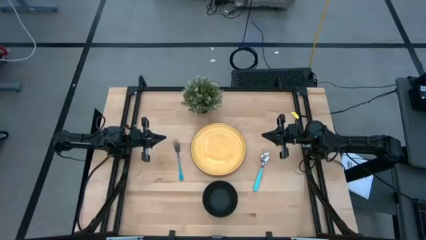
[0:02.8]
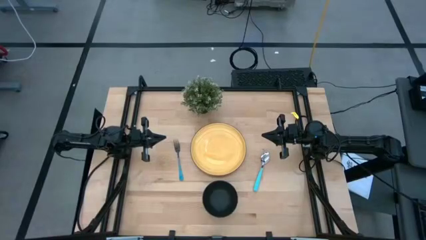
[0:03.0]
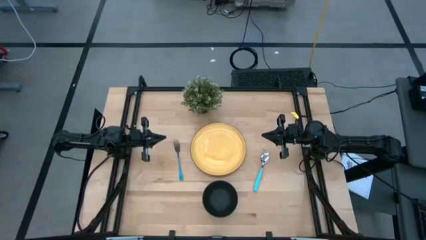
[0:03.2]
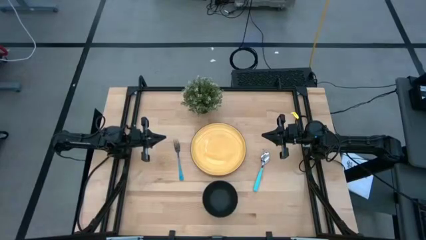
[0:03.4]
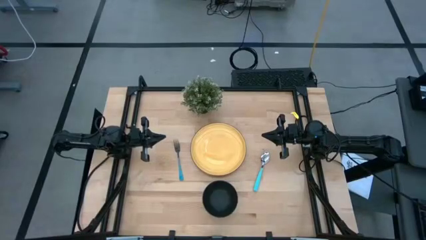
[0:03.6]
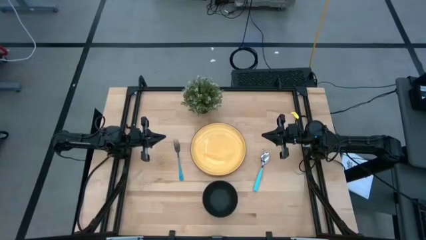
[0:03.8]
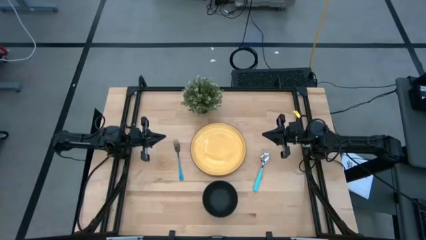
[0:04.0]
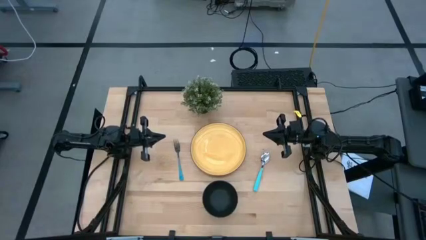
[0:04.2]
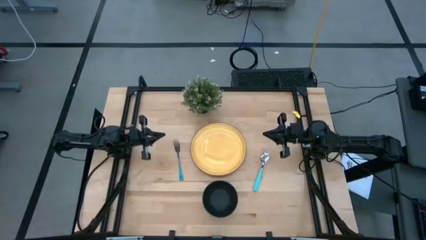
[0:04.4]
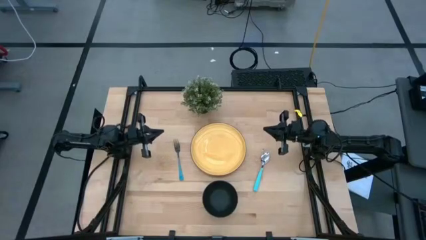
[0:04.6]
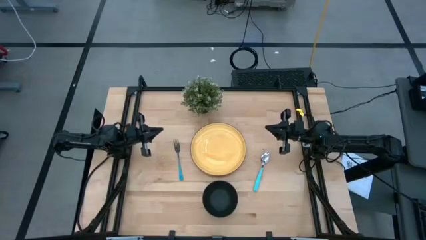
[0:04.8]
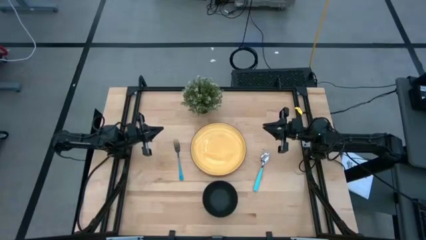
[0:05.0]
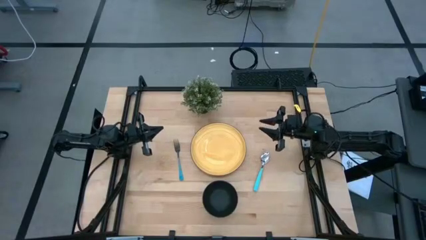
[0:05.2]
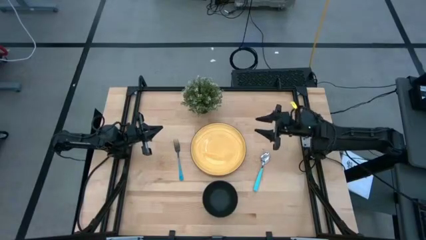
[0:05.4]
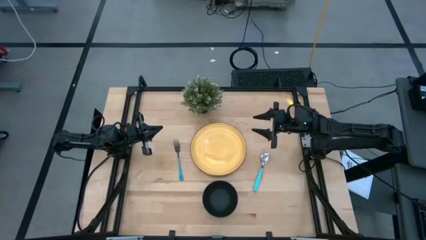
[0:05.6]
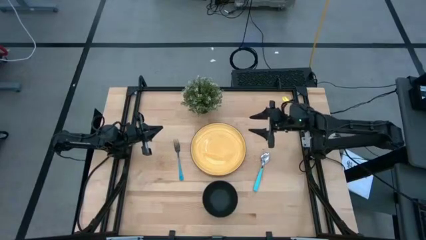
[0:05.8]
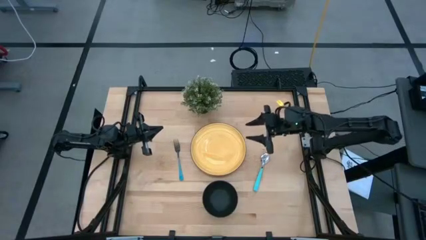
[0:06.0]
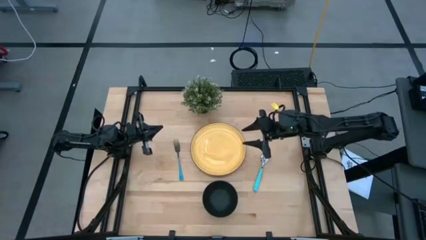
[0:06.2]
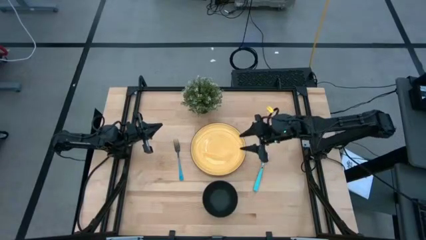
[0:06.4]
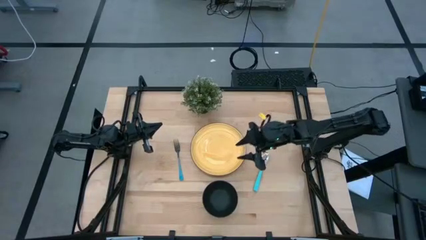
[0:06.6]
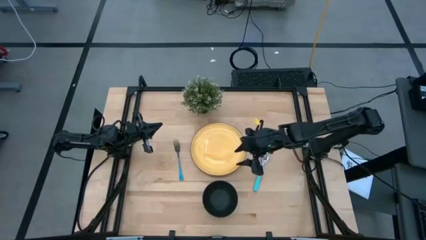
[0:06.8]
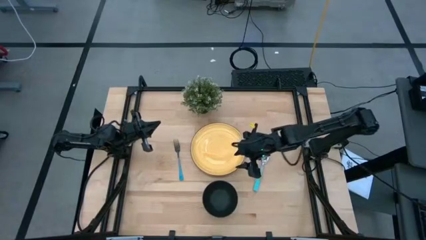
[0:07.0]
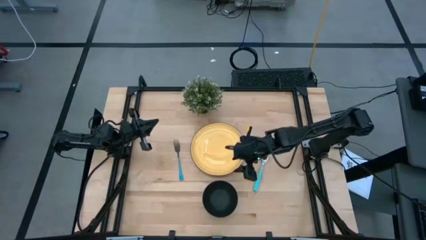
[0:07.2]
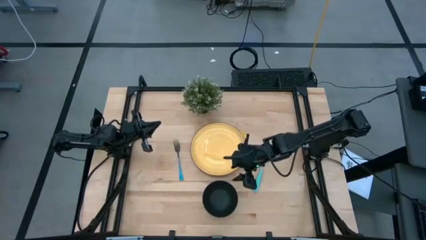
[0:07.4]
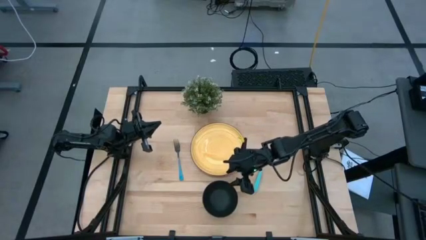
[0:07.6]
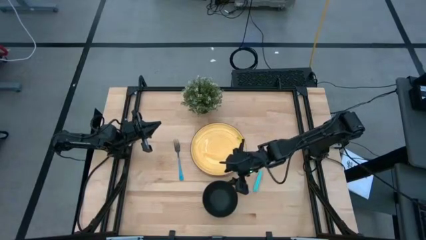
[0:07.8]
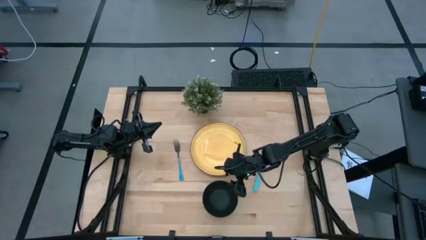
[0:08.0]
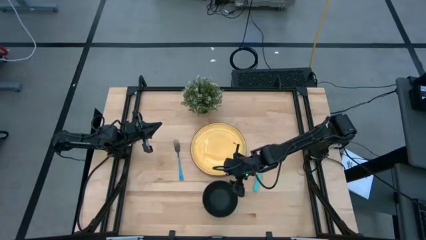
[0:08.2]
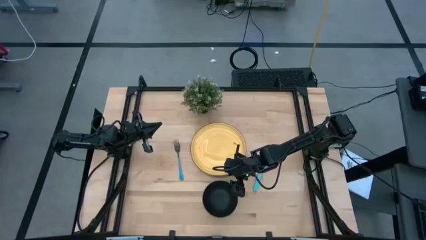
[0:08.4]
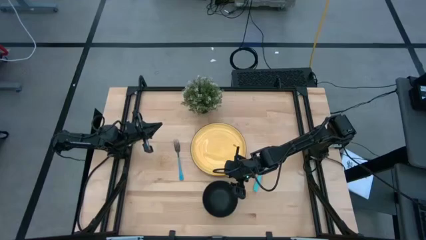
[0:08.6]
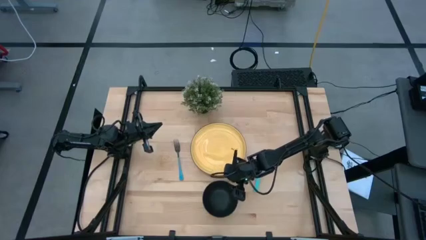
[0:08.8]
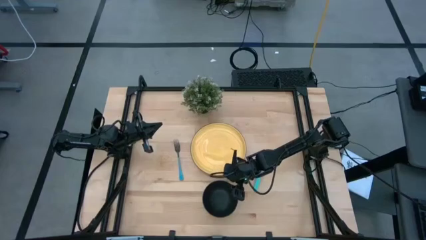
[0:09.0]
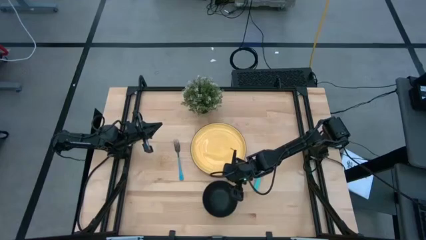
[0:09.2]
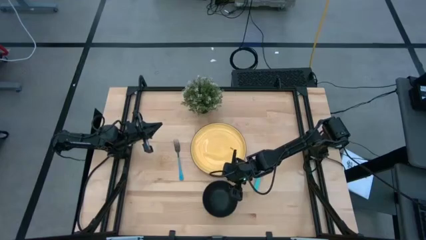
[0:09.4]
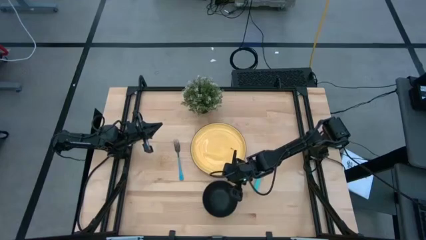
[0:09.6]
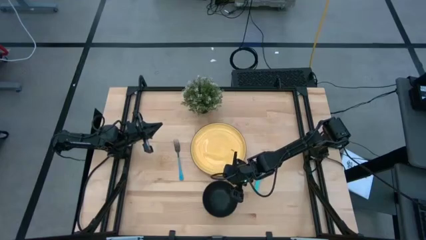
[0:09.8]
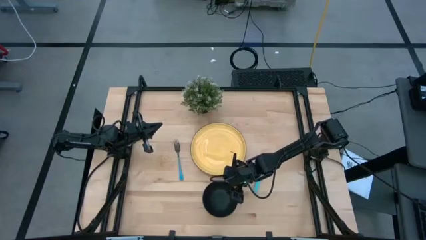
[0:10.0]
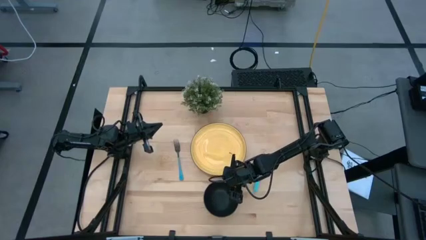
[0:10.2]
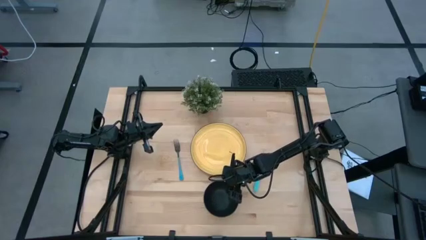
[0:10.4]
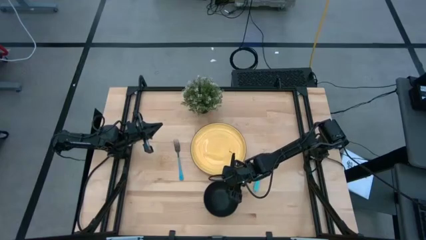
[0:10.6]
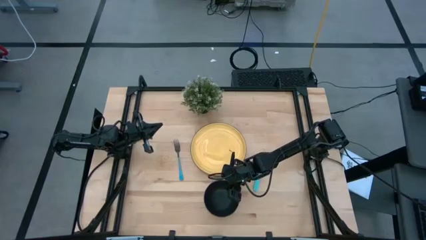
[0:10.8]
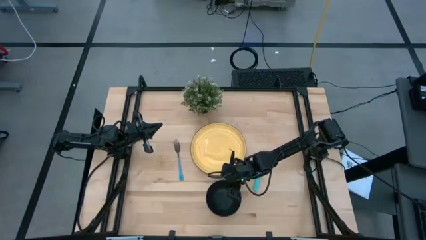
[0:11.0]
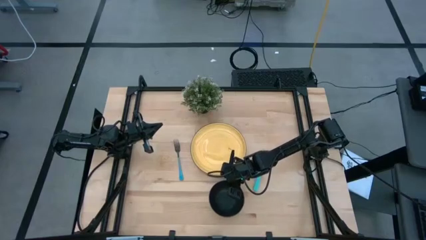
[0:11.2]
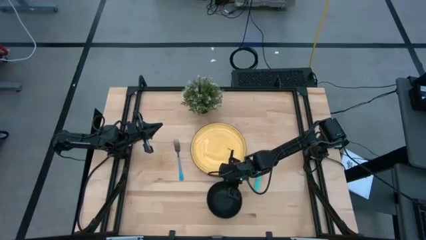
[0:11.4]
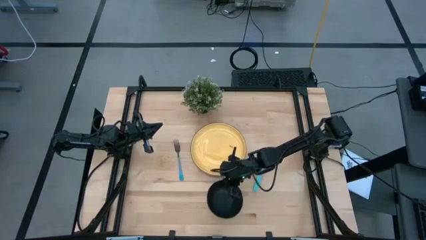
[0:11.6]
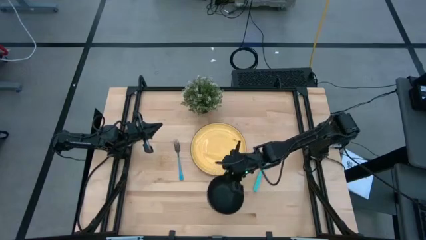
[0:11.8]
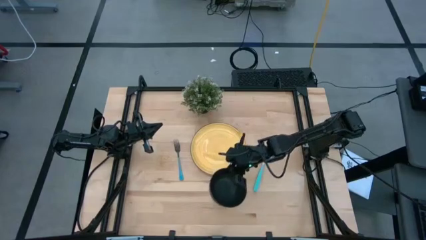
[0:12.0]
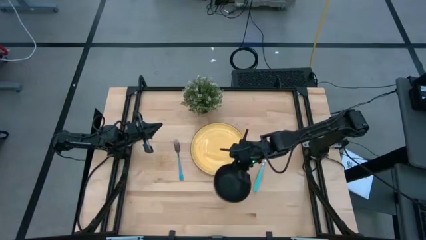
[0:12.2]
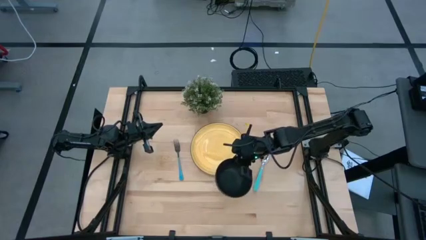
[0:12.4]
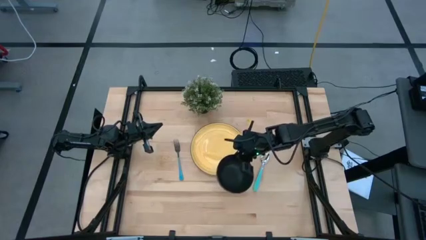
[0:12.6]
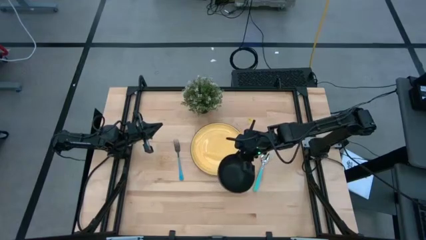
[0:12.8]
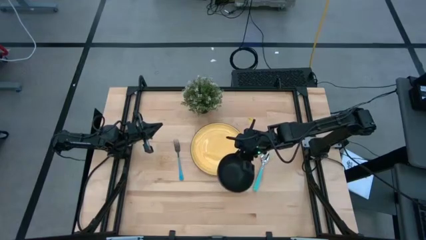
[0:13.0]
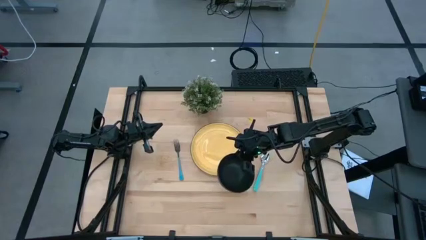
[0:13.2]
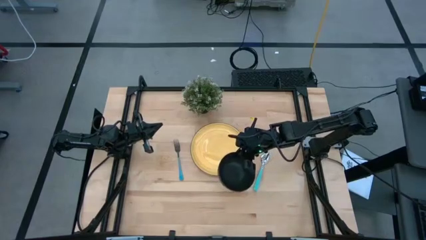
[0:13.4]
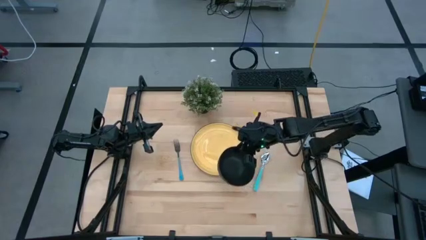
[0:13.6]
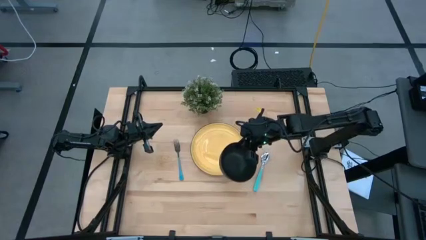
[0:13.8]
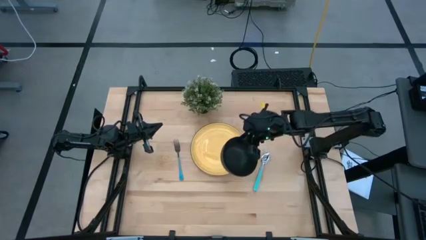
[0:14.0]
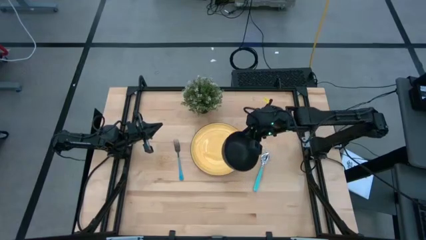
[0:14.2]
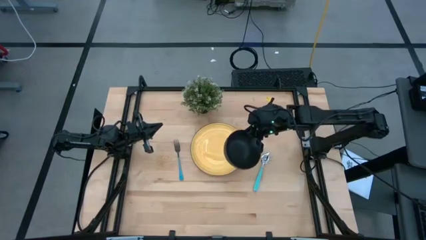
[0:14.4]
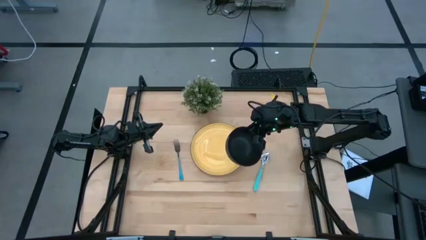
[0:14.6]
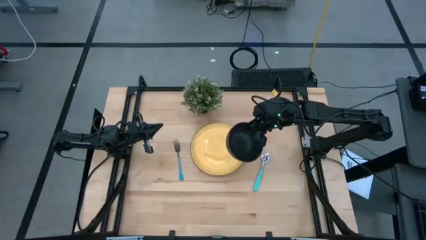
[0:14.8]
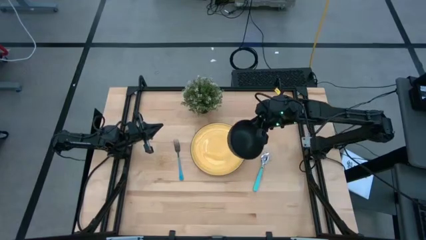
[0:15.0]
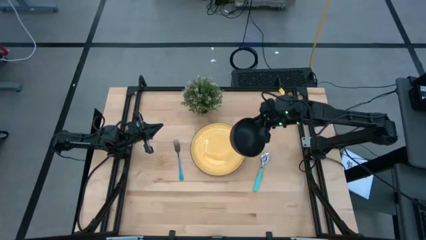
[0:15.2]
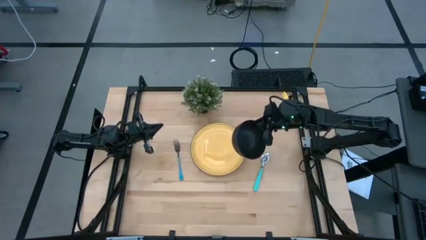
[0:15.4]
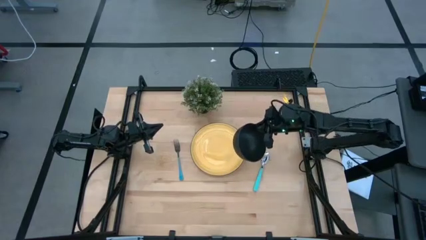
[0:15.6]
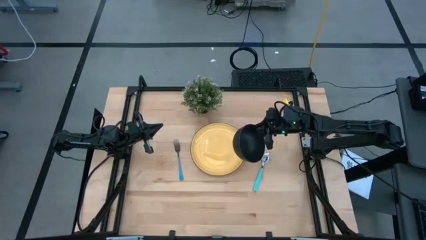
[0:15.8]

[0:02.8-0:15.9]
Task: Set table place
Put the black bowl on the yellow plate
